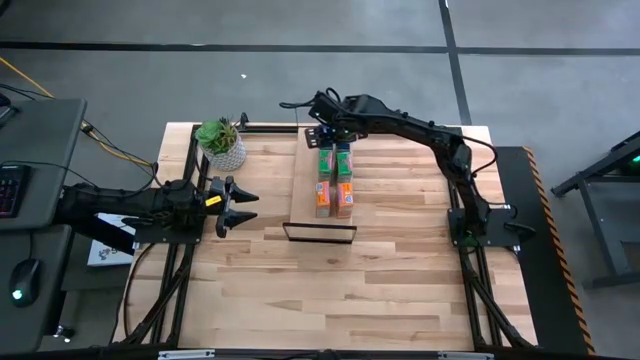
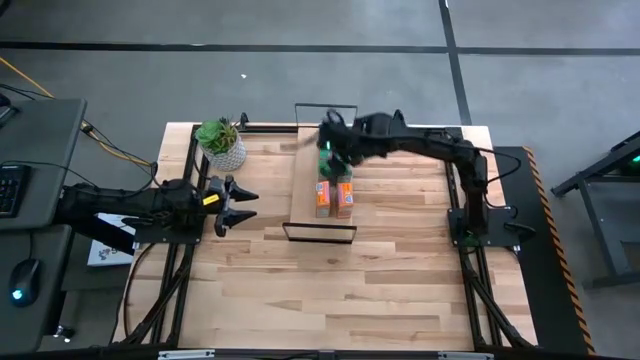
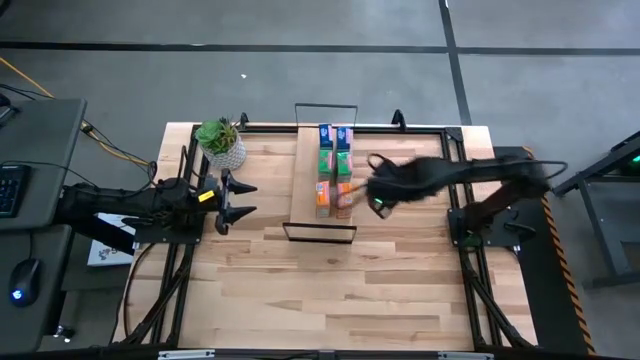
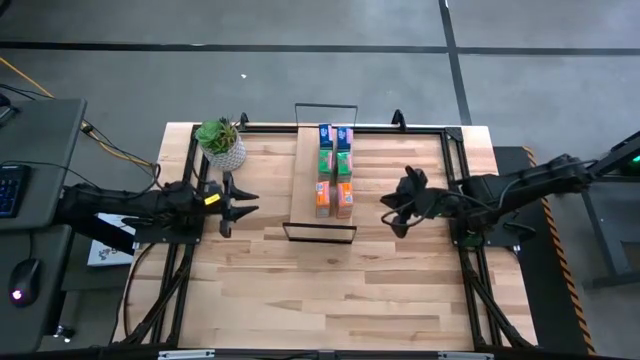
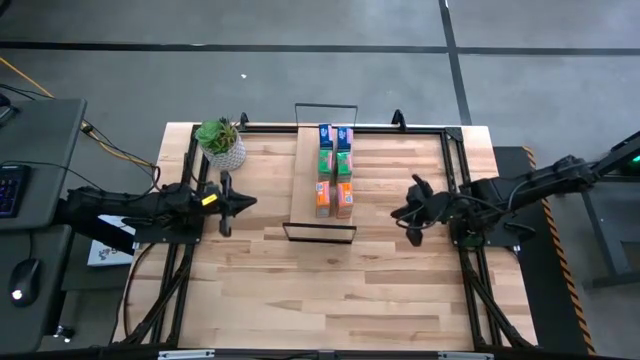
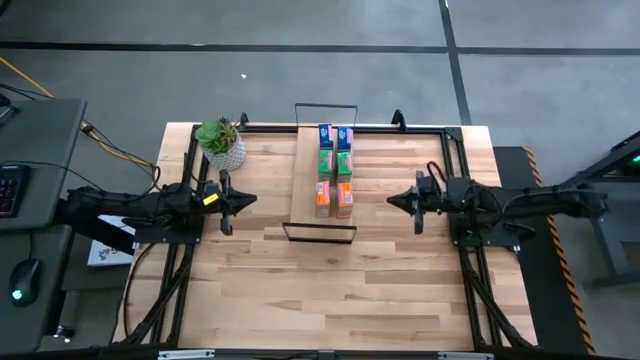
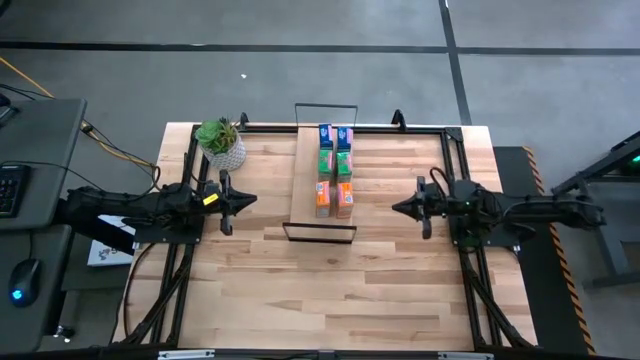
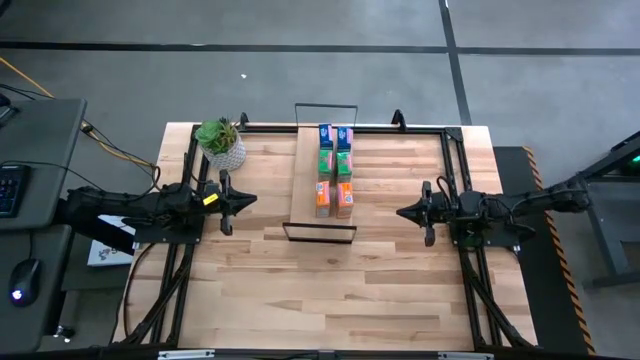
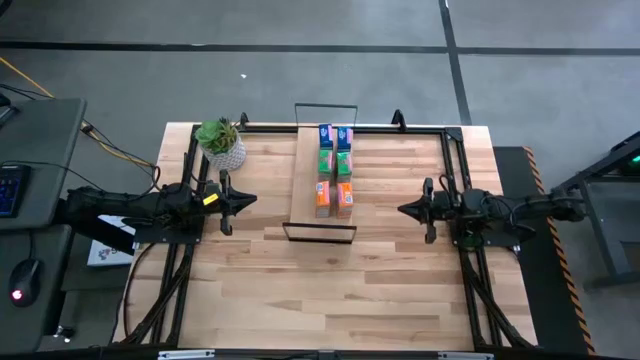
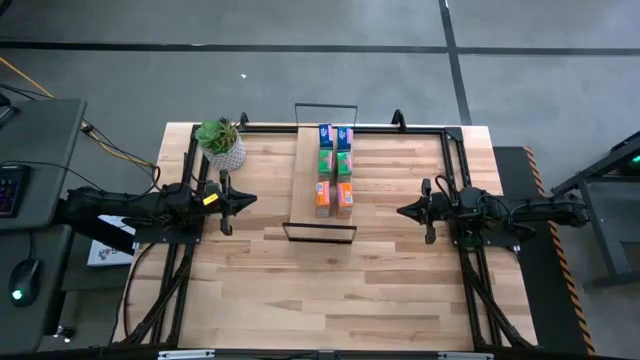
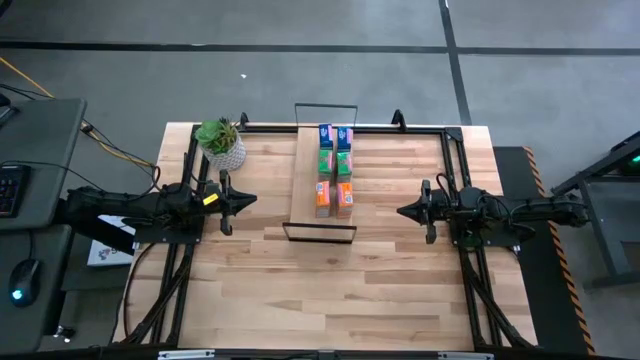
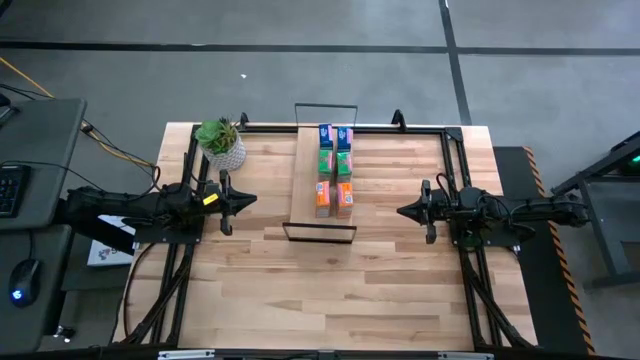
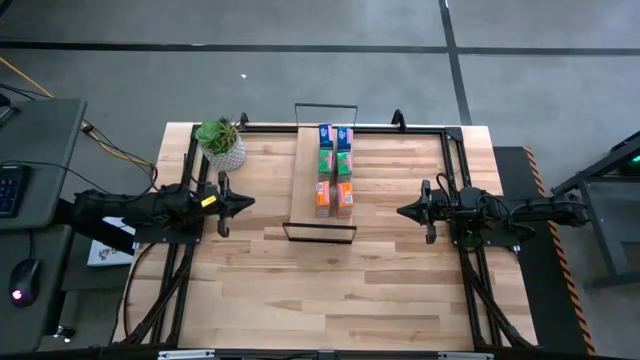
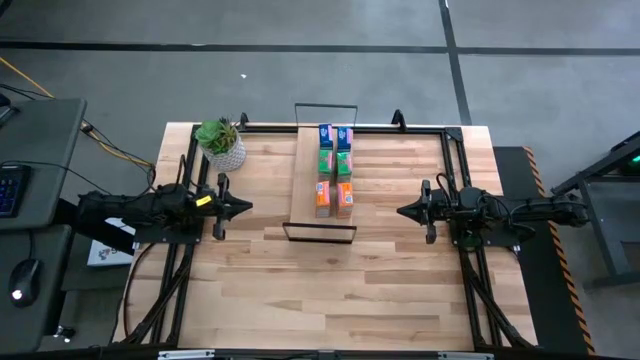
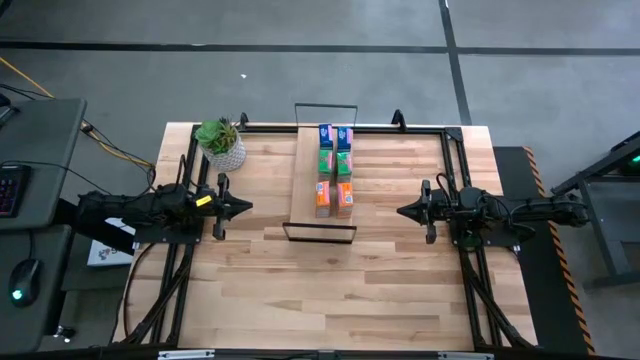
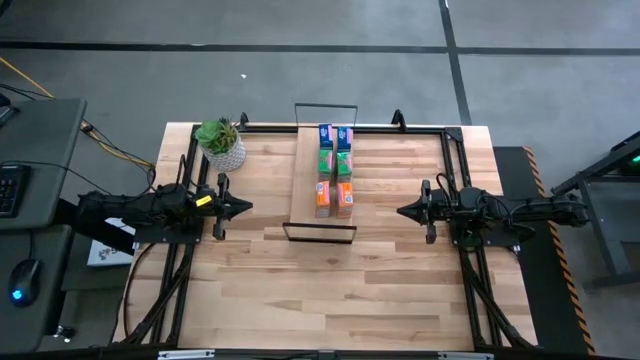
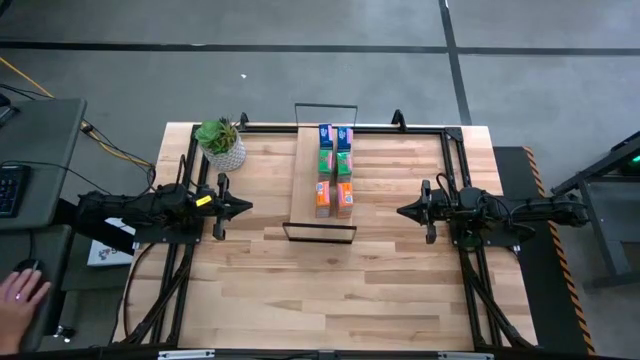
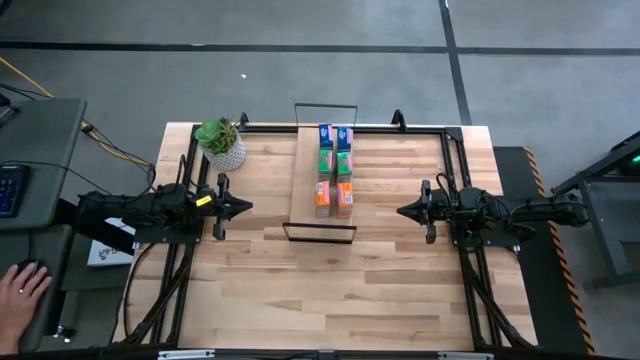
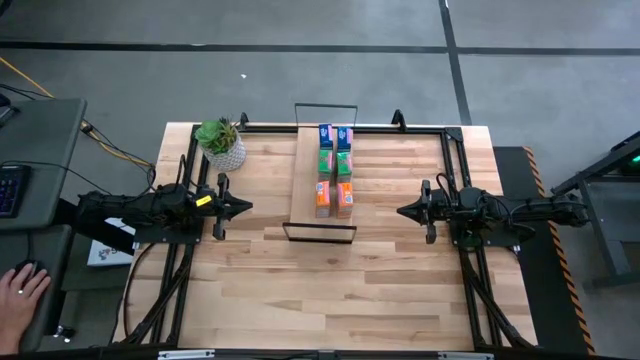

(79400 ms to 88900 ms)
Task: Stack cereal on shelf
Return to Home Position

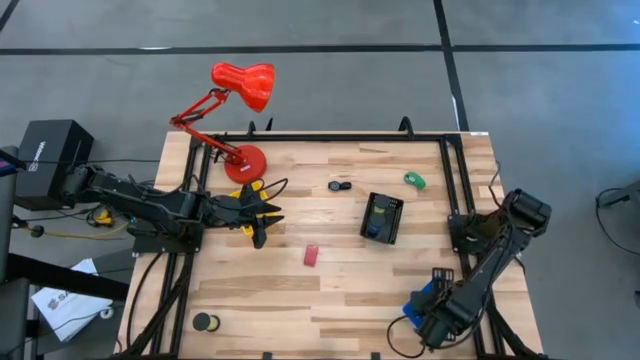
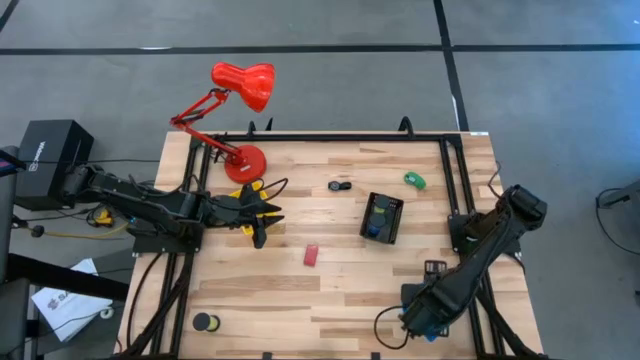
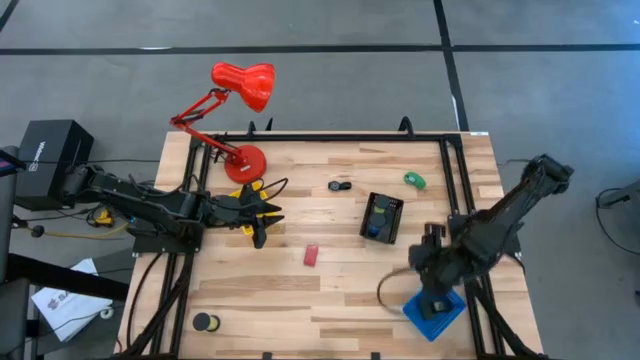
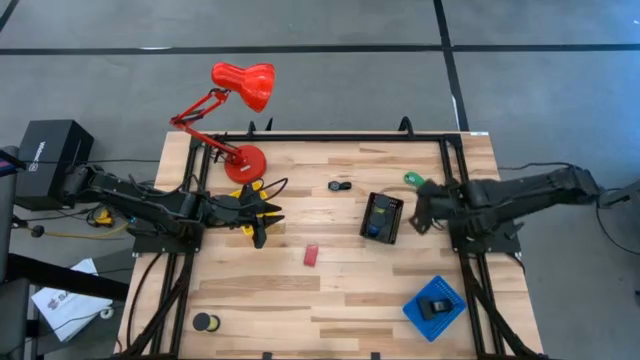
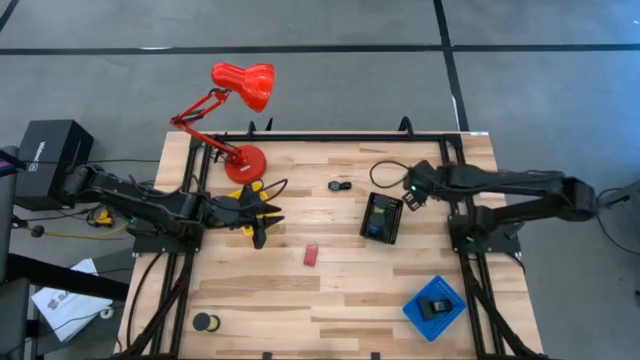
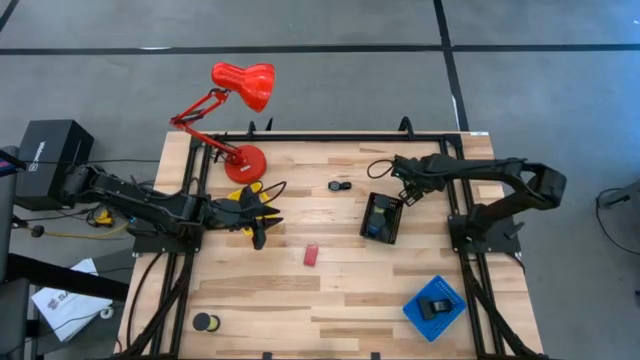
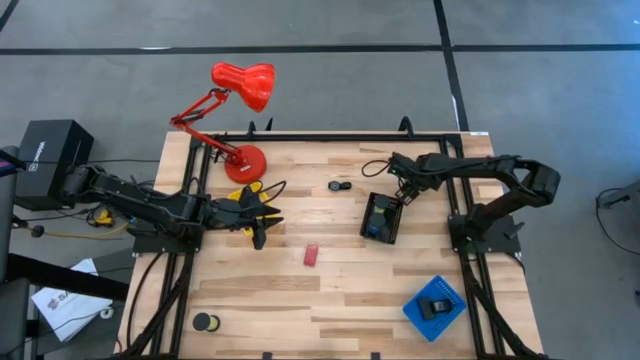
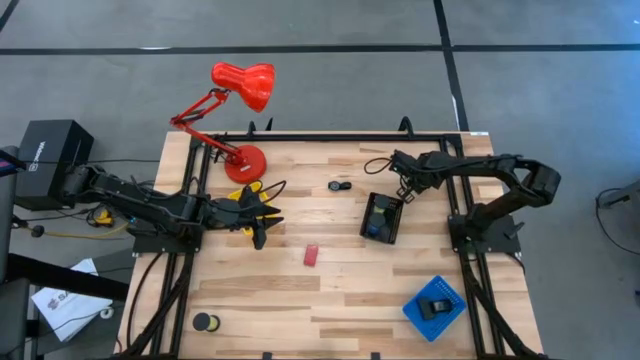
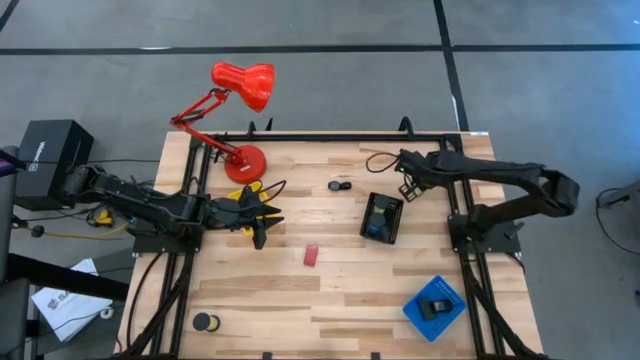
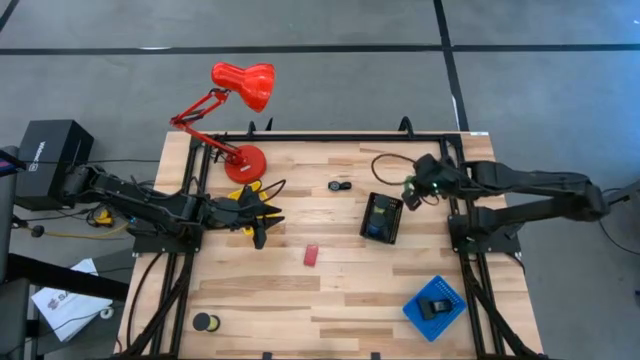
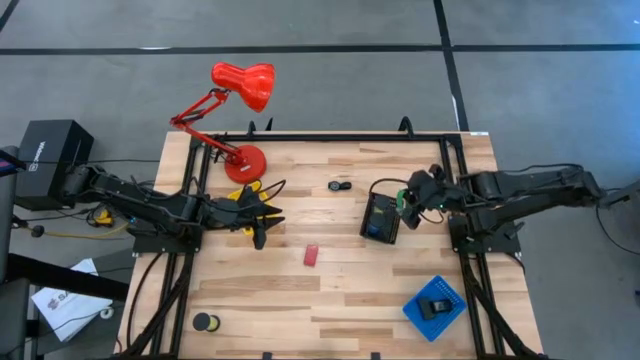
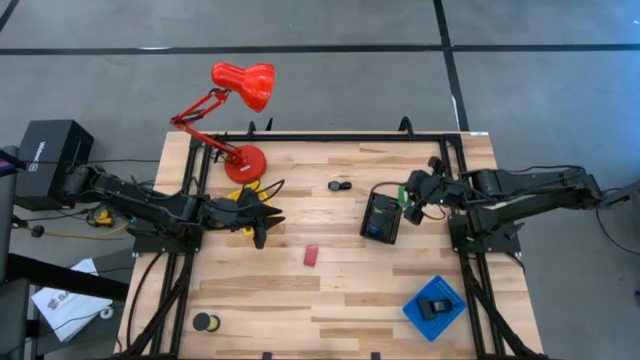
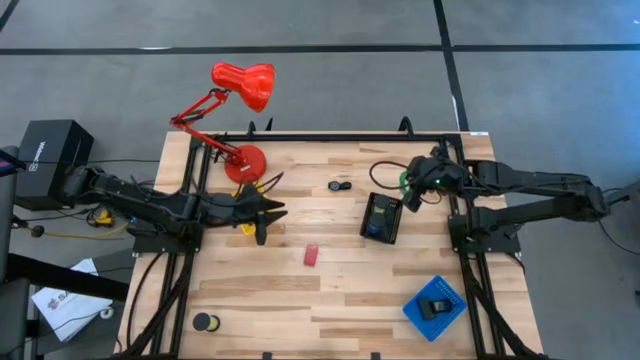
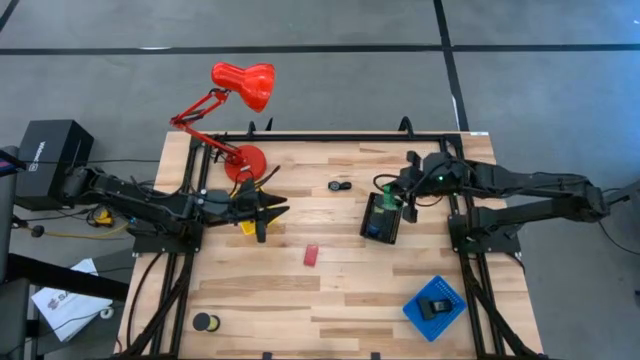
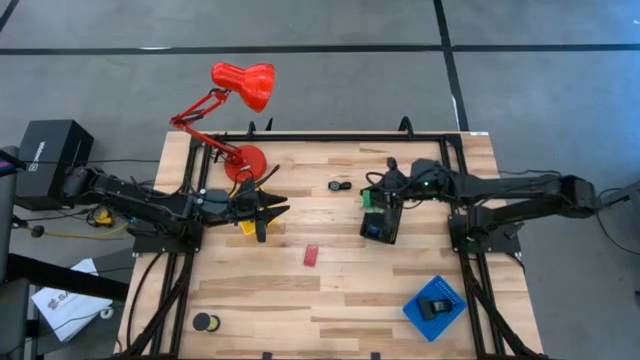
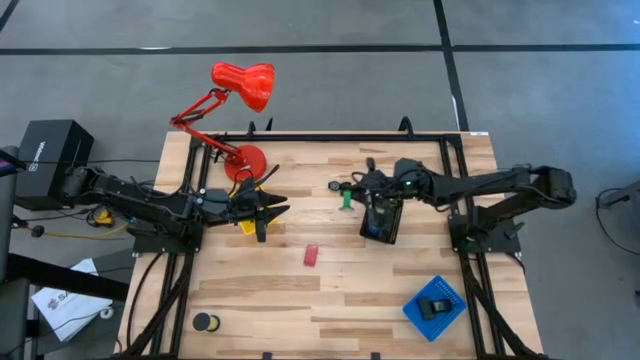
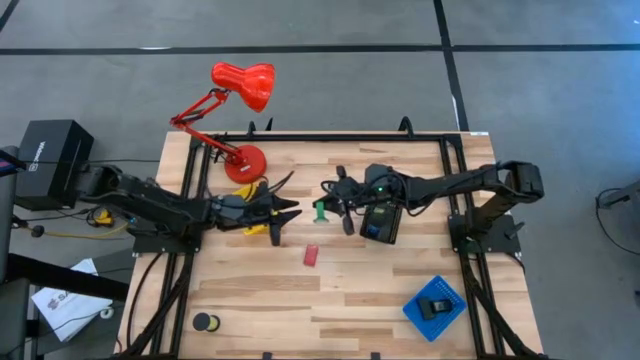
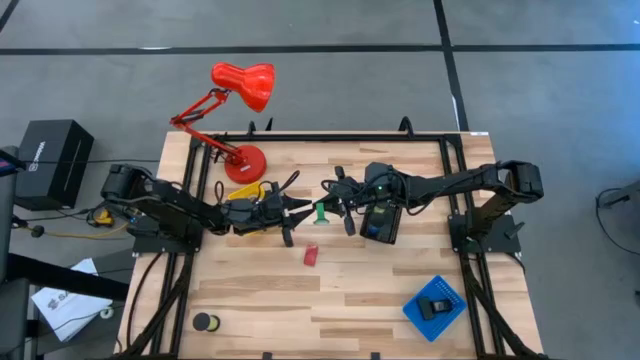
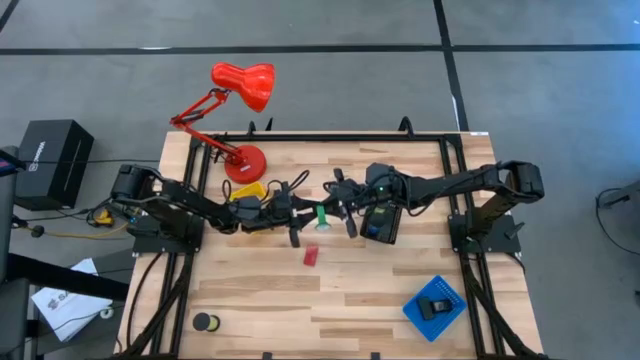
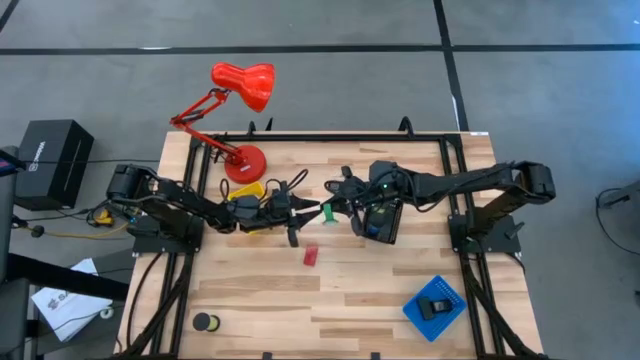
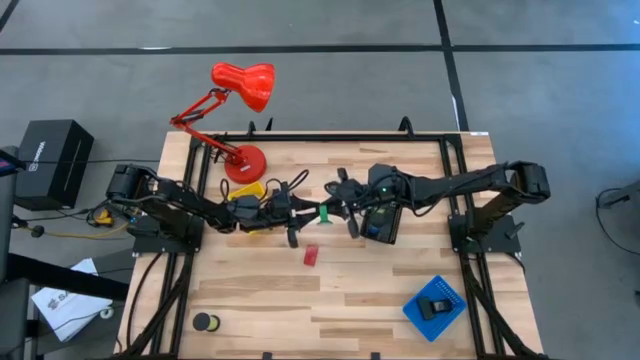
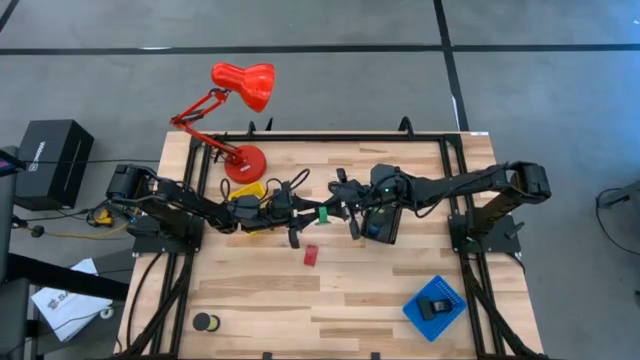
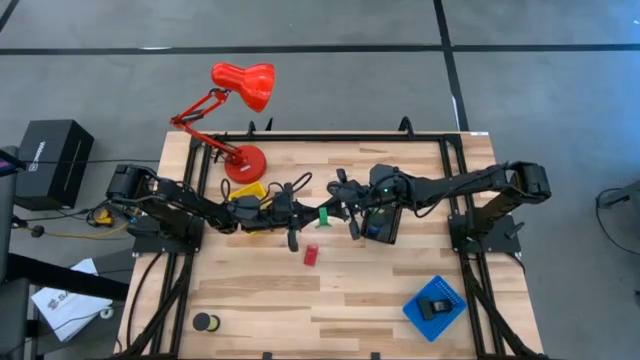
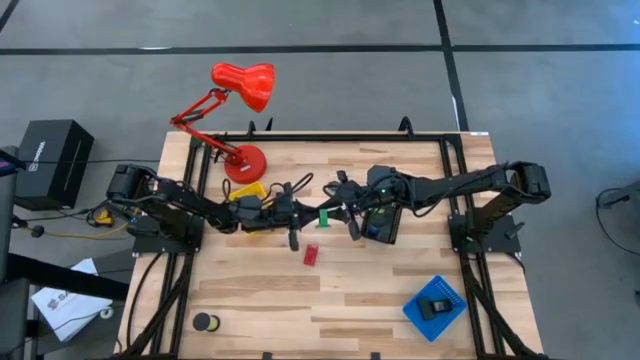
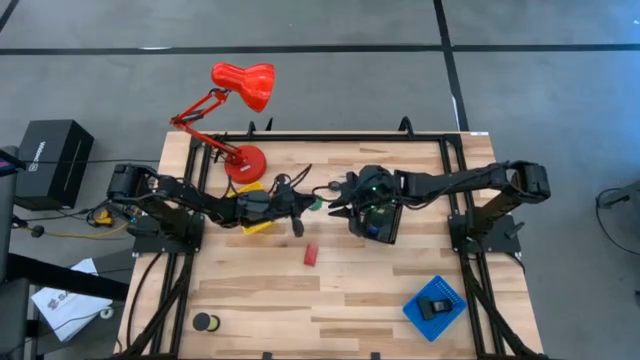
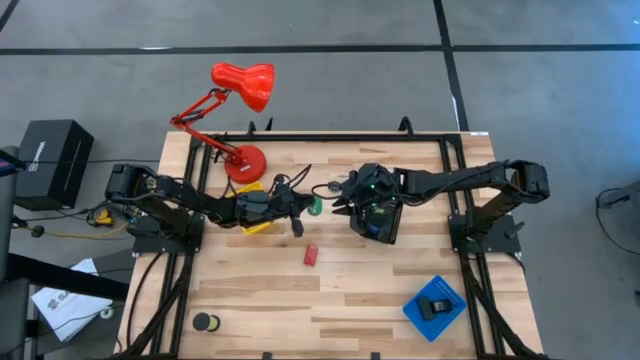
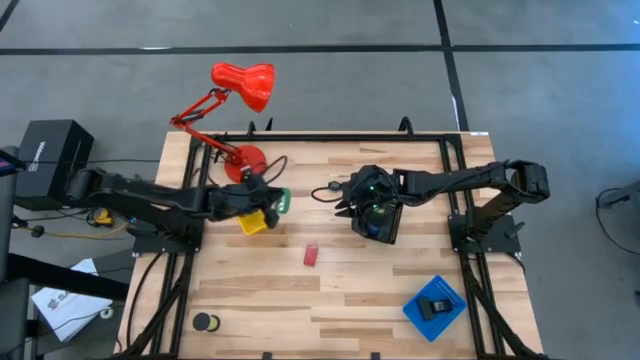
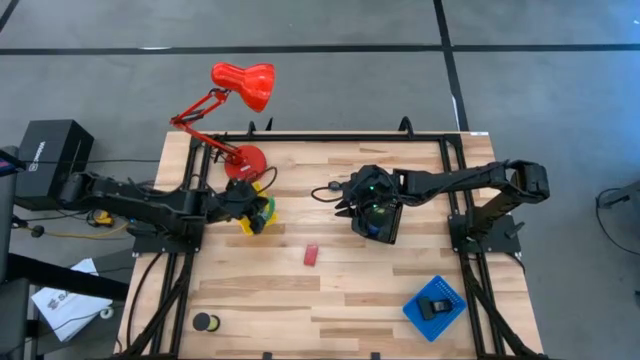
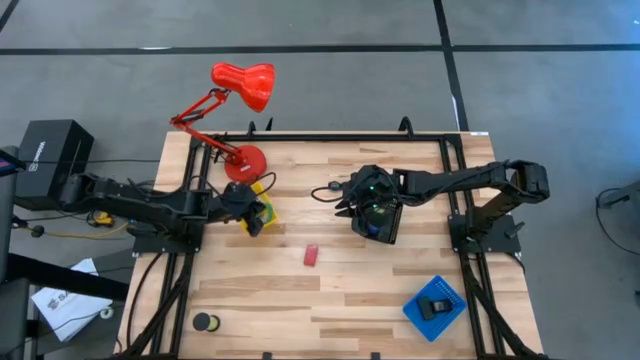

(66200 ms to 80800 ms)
Task: Pick & Place Office items
Put the green wristwatch into the yellow bin
